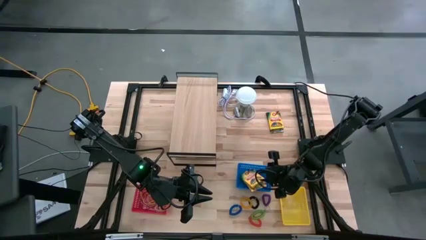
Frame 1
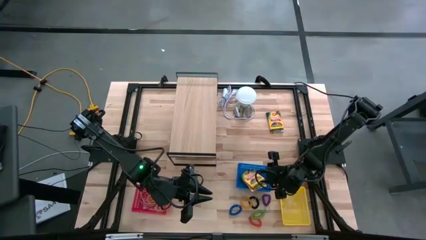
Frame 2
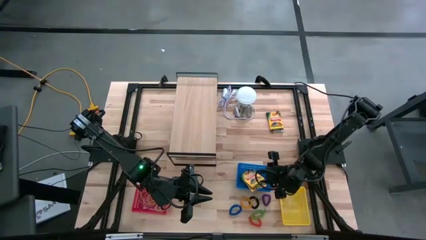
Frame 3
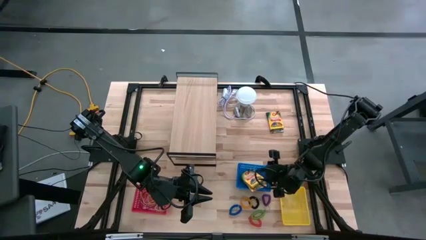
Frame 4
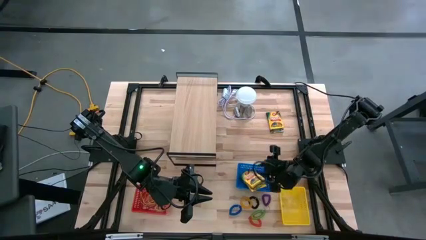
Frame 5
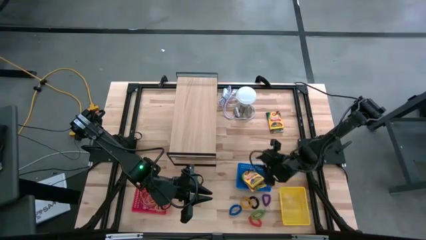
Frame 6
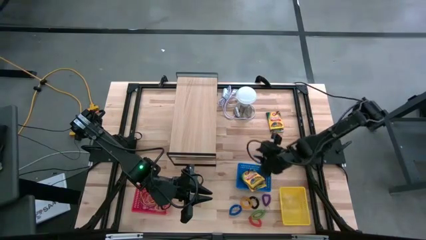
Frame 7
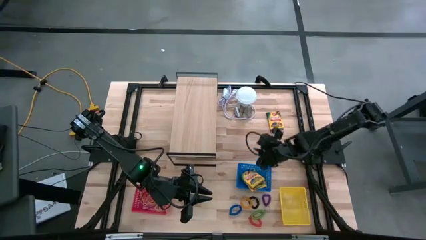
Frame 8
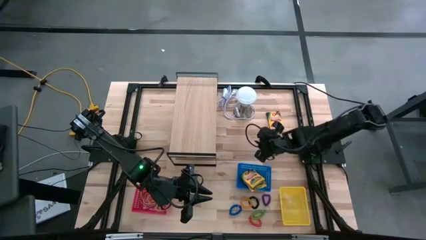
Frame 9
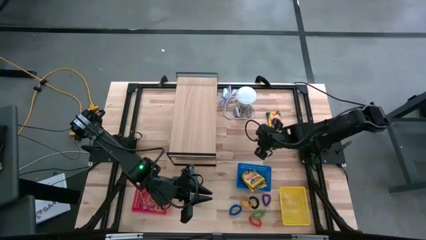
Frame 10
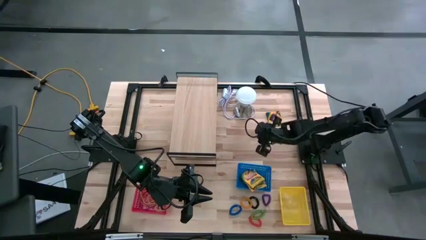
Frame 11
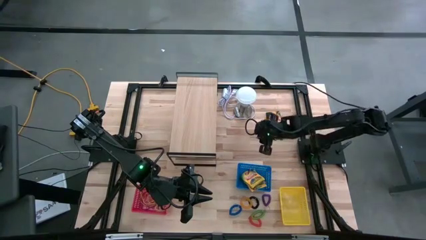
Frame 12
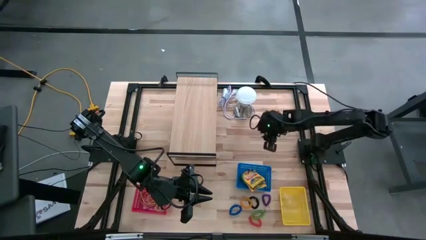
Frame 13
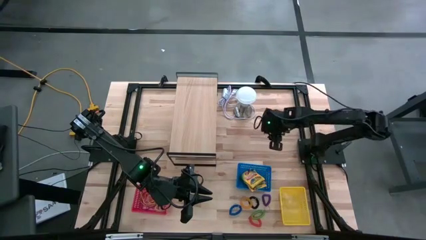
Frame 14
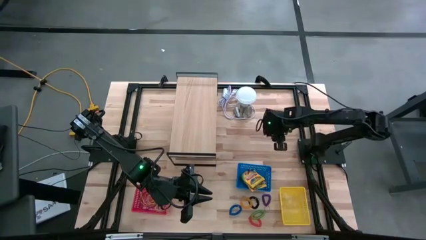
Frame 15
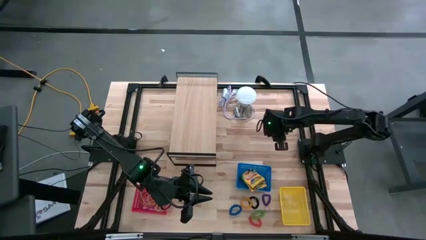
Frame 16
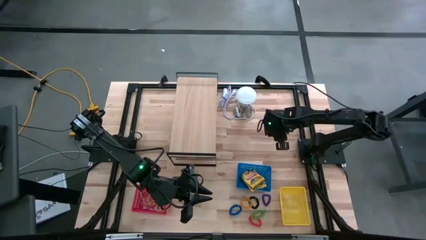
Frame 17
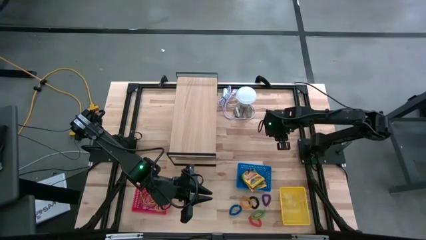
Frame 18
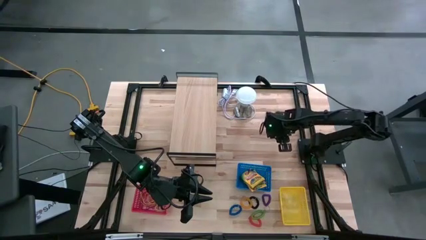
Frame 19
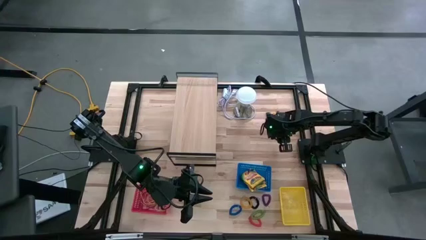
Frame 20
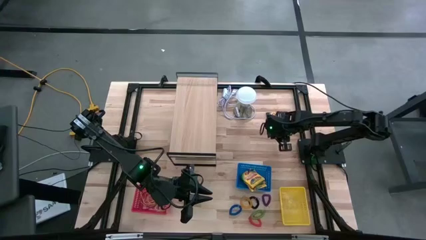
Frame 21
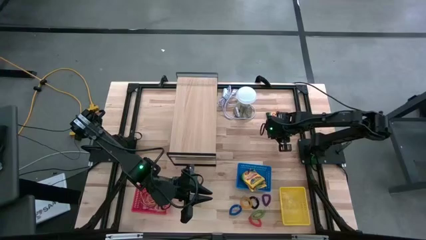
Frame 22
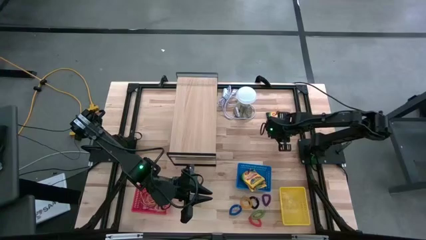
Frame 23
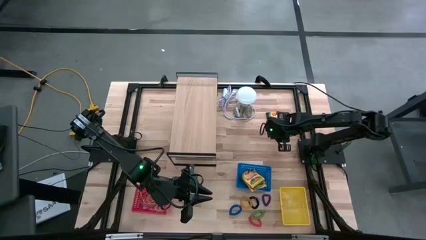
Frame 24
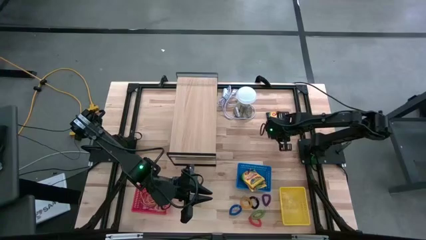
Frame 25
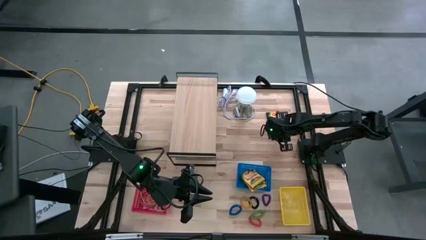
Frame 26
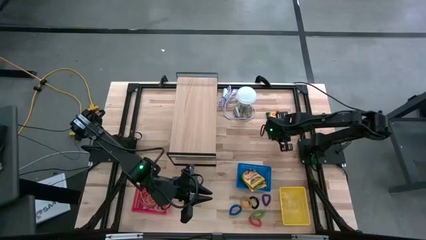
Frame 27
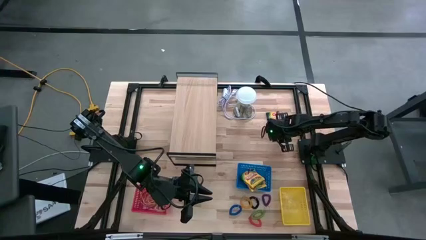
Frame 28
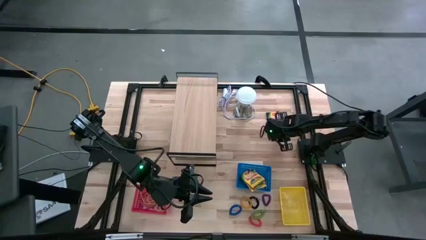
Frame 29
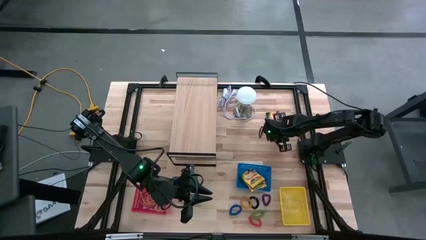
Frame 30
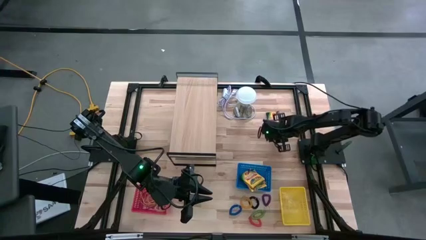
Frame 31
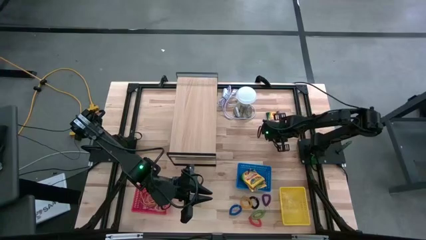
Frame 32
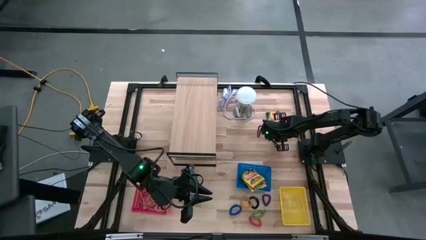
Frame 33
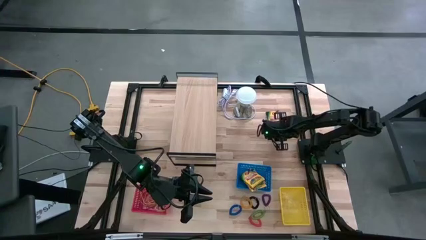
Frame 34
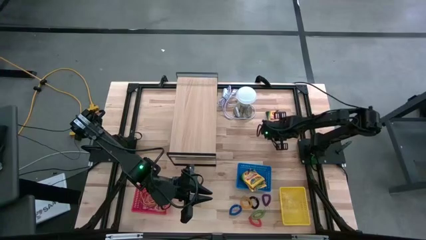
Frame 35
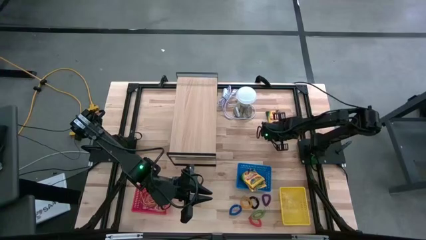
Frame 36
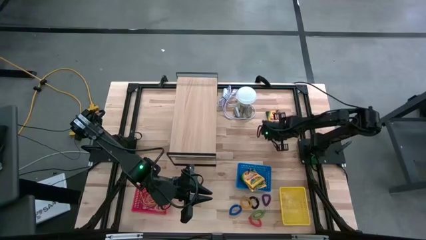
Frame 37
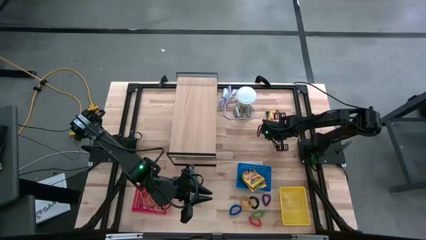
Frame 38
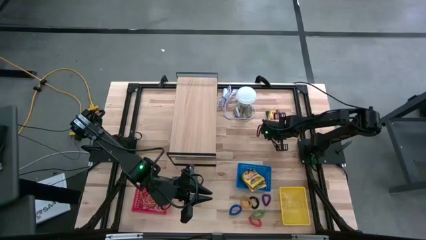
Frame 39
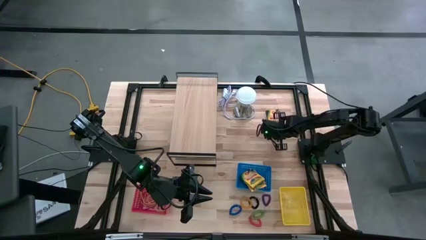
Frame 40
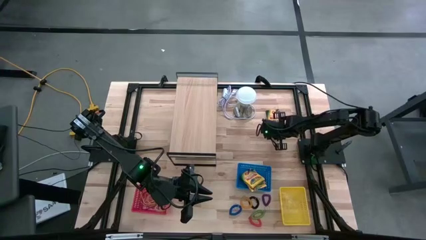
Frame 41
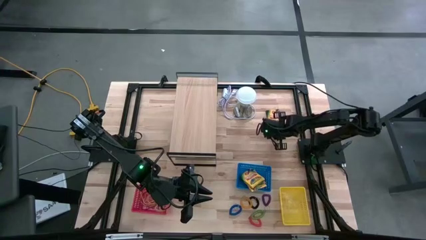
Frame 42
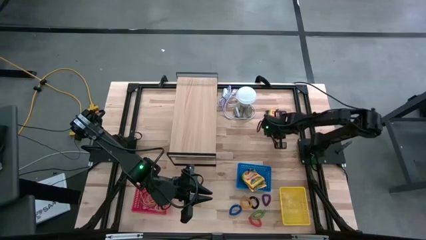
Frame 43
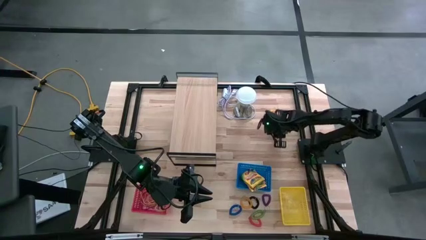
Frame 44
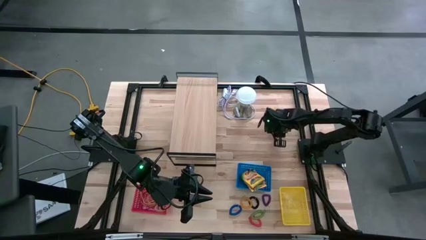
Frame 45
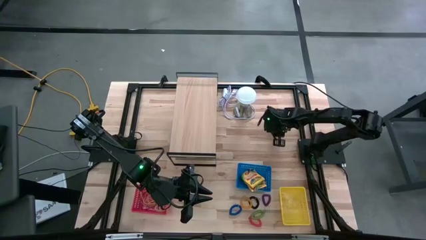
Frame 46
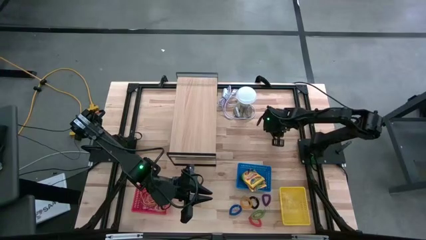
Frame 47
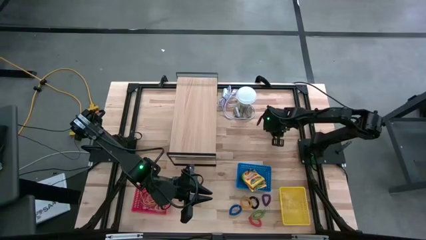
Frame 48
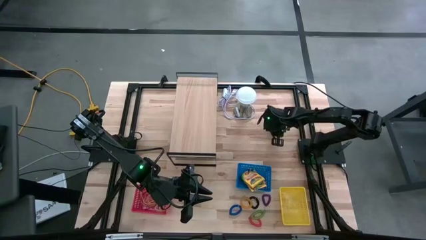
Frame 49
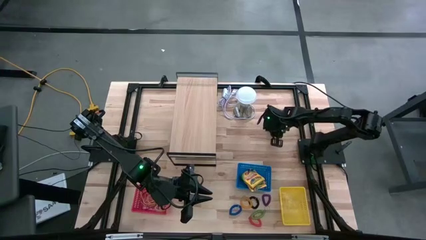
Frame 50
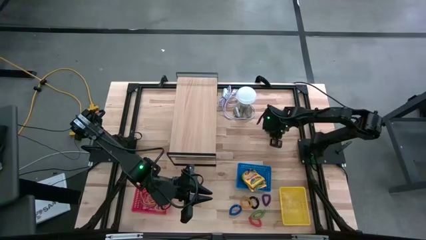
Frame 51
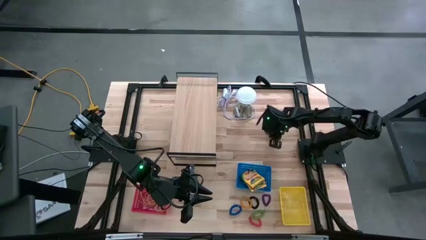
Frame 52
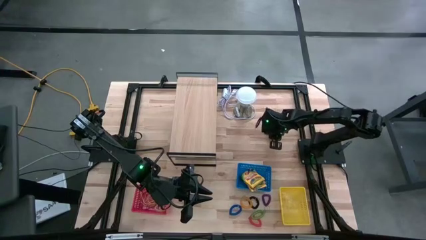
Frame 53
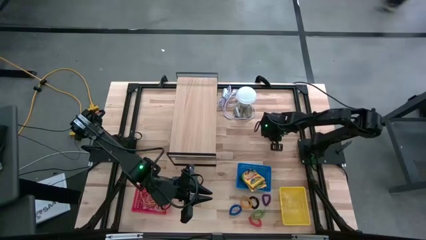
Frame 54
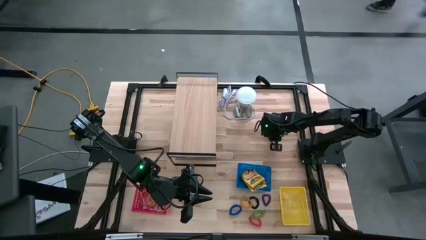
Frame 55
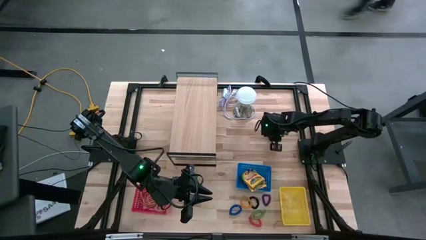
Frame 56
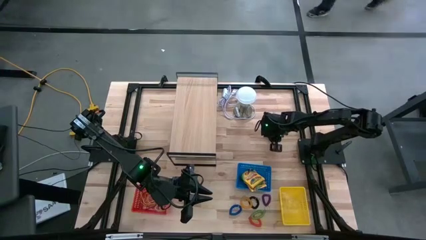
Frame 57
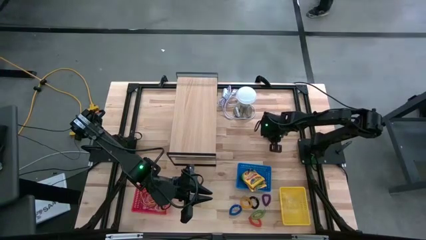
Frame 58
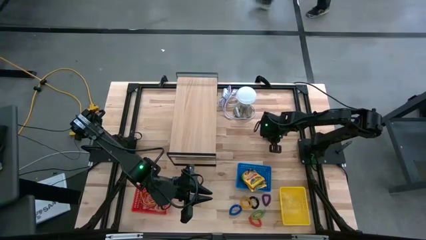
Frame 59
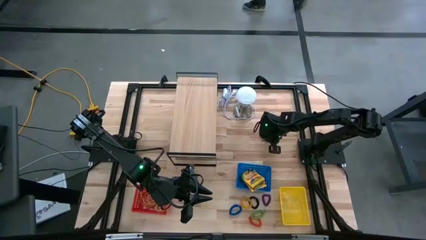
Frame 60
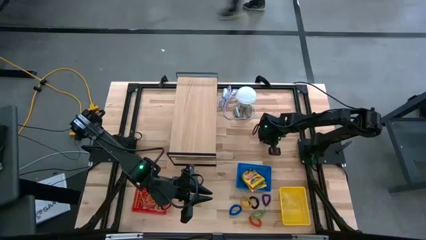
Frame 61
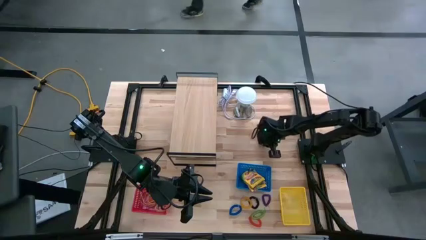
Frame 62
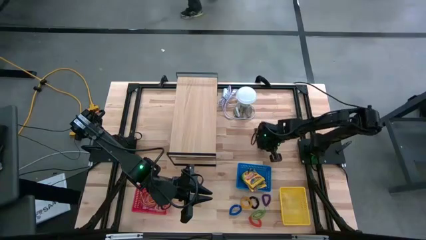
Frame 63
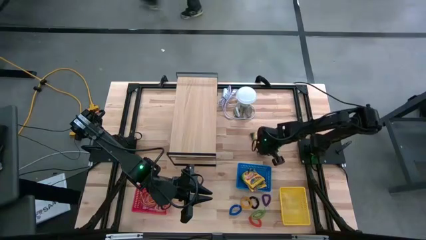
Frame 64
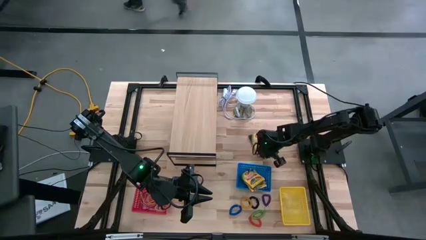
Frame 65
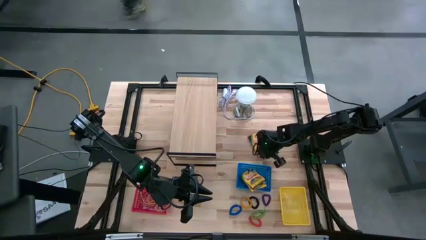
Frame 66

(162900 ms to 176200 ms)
Task: Pick & Place Office Desk Supplies
Put the yellow crayon box into the blue bin

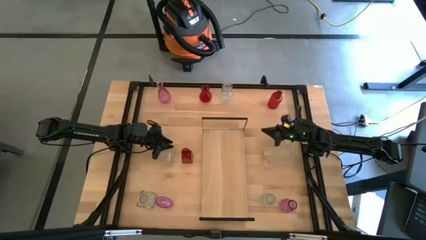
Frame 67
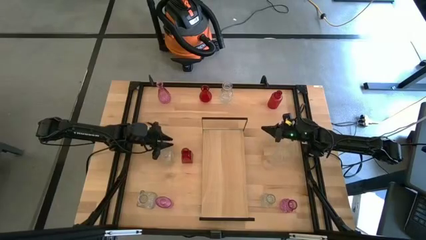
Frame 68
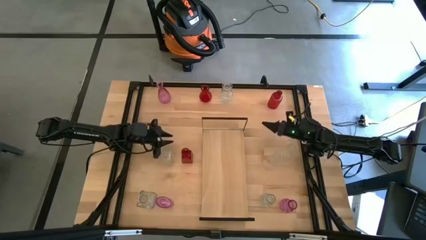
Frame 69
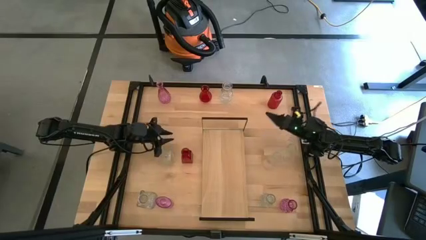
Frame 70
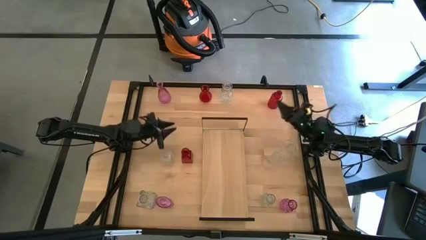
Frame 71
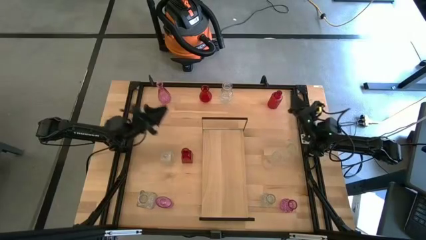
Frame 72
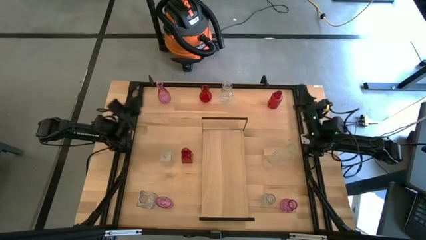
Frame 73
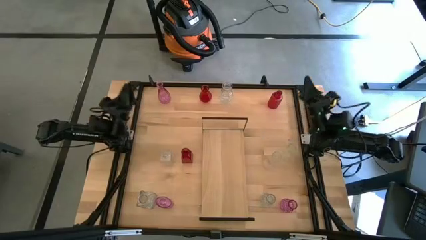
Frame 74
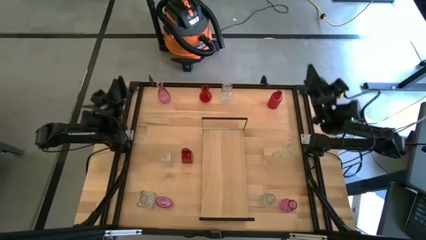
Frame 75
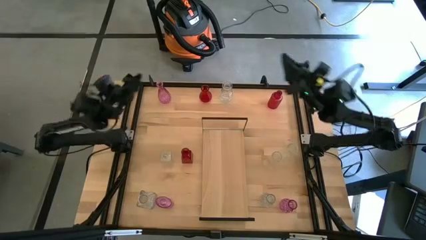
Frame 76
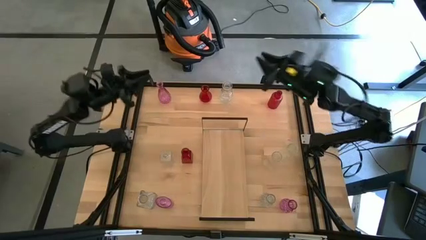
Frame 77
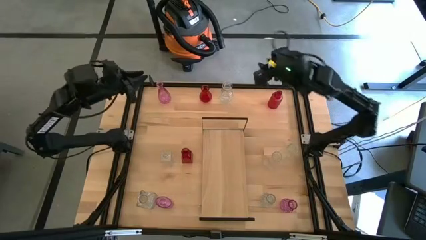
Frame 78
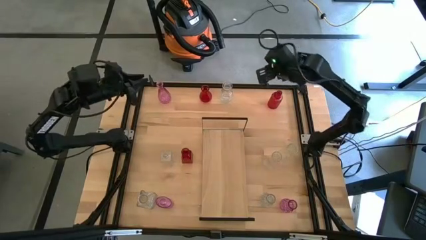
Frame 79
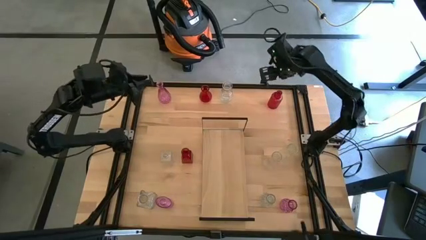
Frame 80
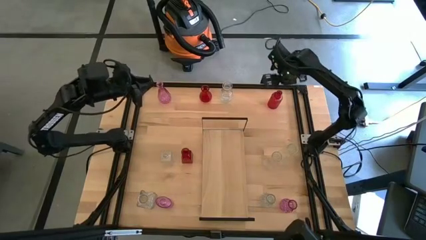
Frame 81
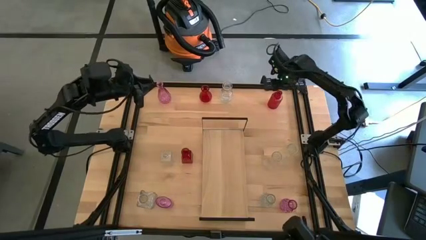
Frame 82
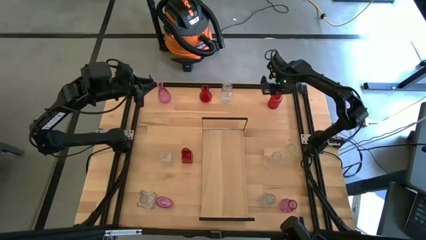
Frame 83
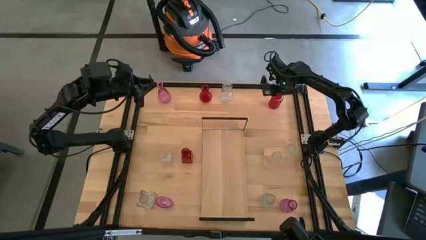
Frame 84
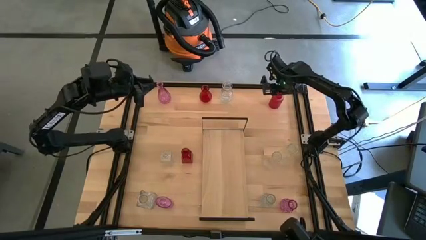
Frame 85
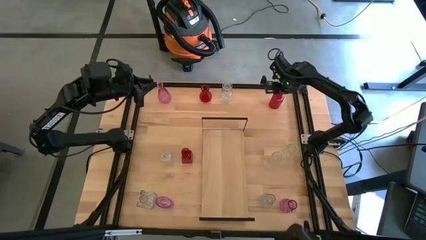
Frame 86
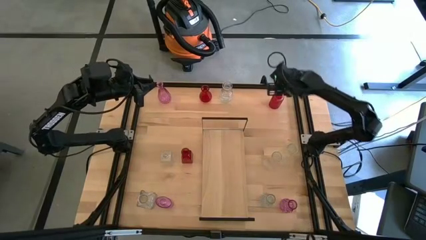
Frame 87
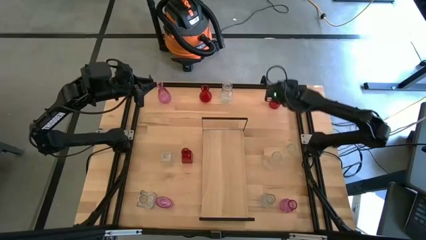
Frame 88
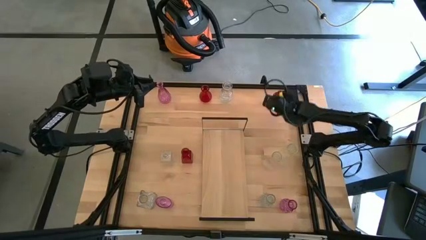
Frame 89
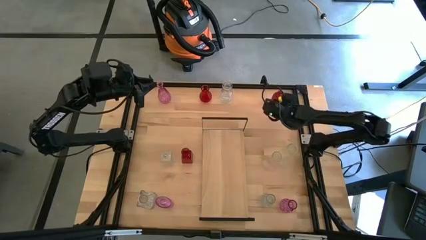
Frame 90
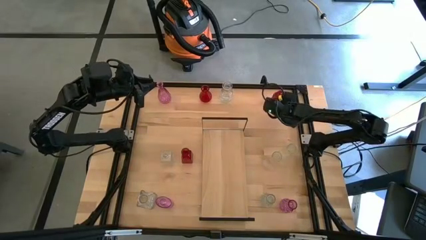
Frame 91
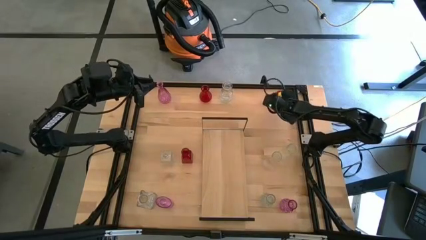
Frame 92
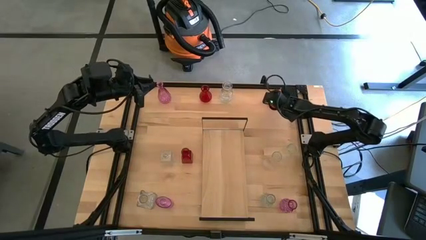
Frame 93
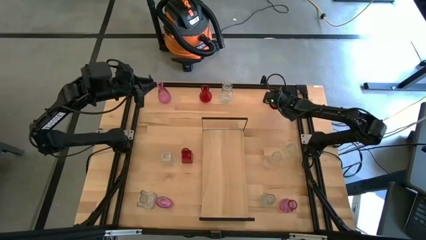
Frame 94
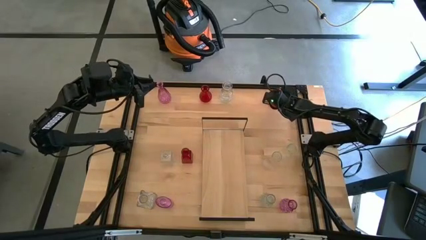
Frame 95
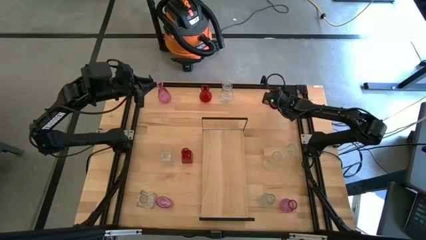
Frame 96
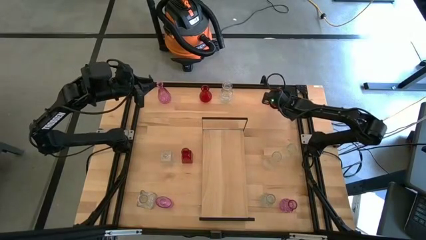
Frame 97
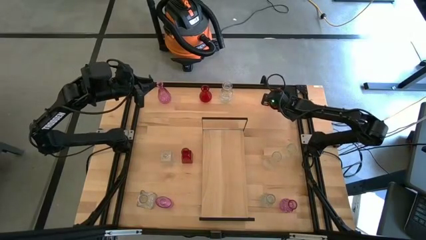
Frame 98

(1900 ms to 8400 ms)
Task: sort vases onto shelf
Put the red vase on the shelf
